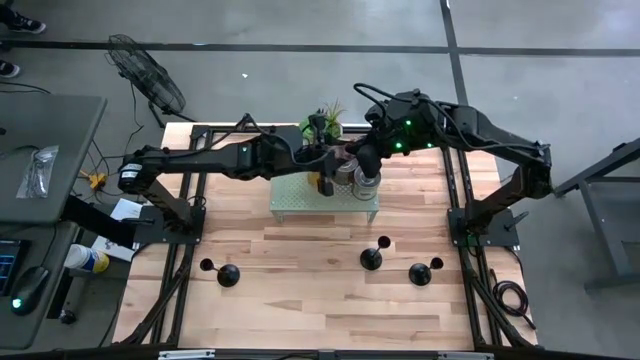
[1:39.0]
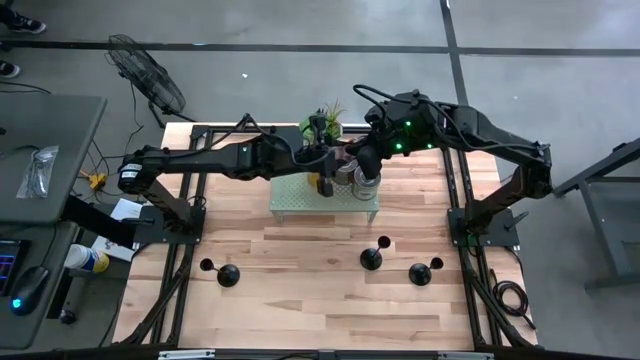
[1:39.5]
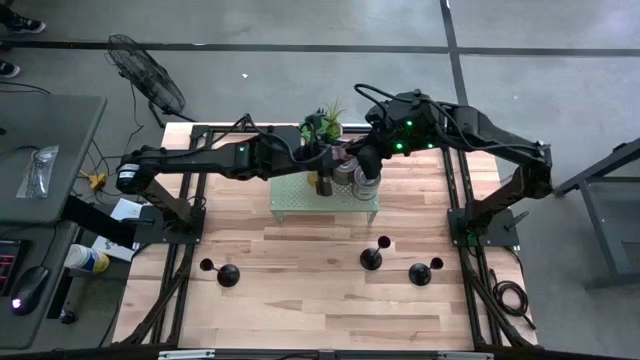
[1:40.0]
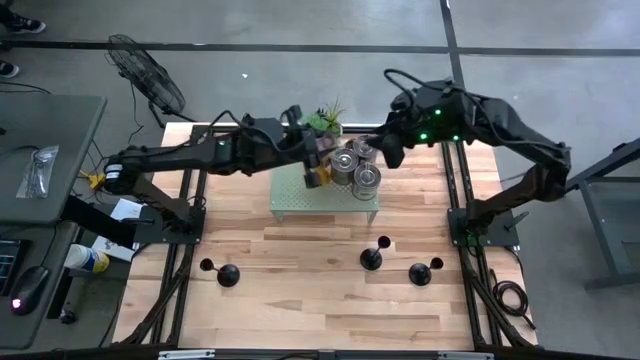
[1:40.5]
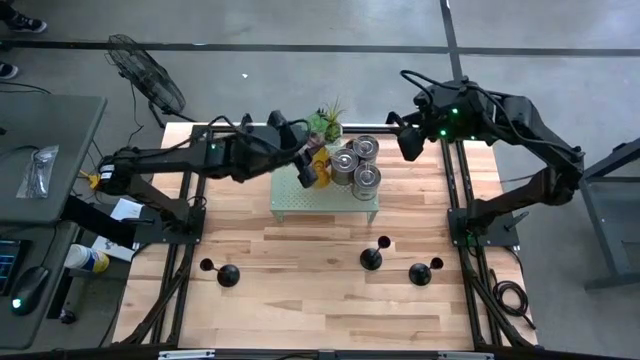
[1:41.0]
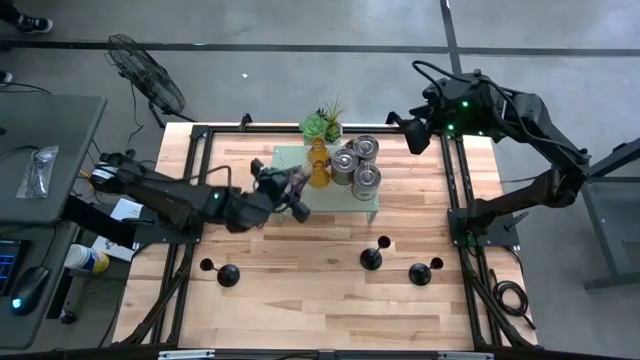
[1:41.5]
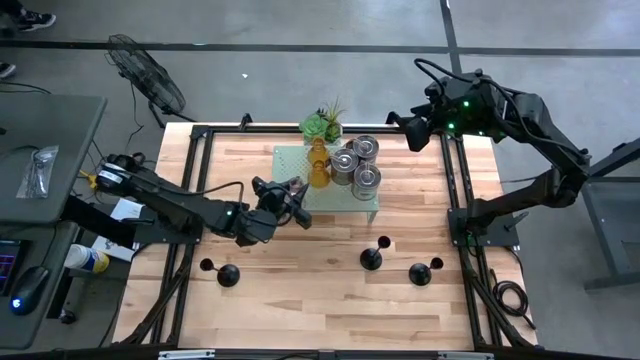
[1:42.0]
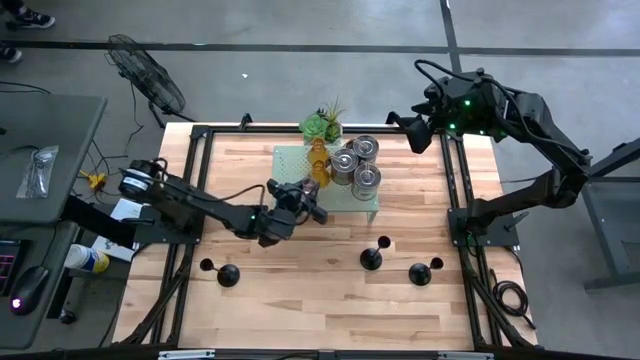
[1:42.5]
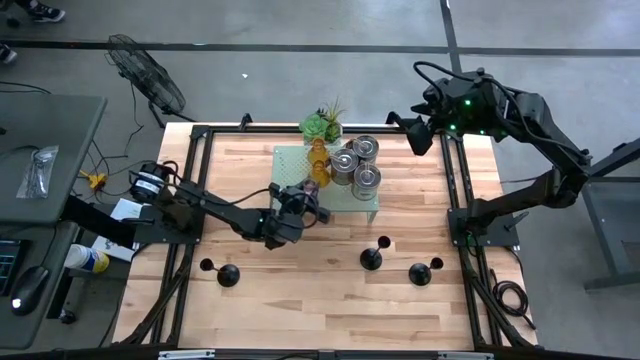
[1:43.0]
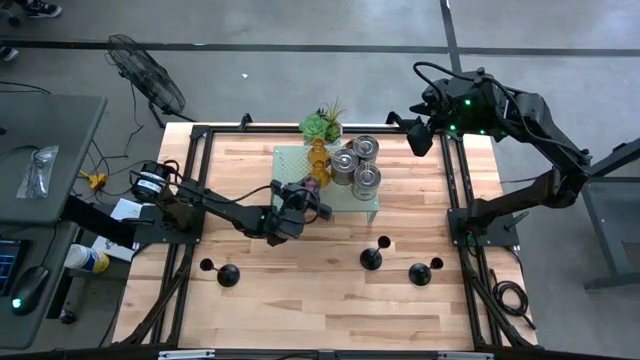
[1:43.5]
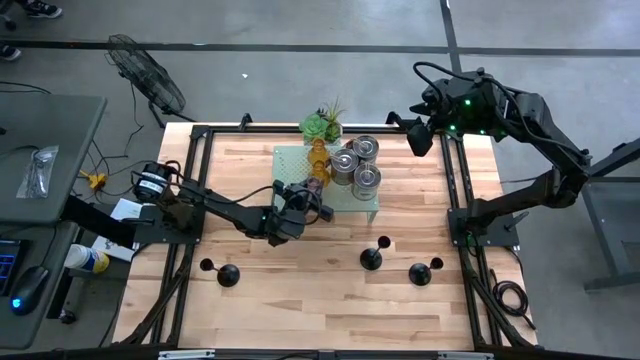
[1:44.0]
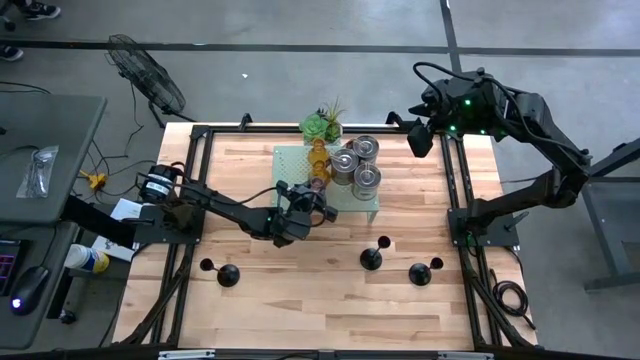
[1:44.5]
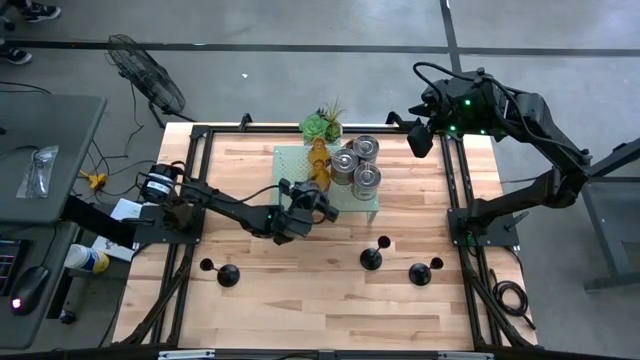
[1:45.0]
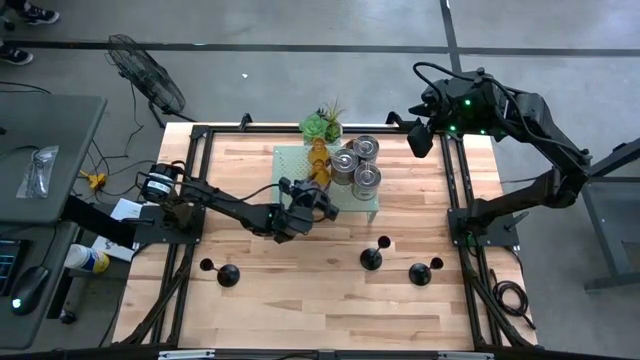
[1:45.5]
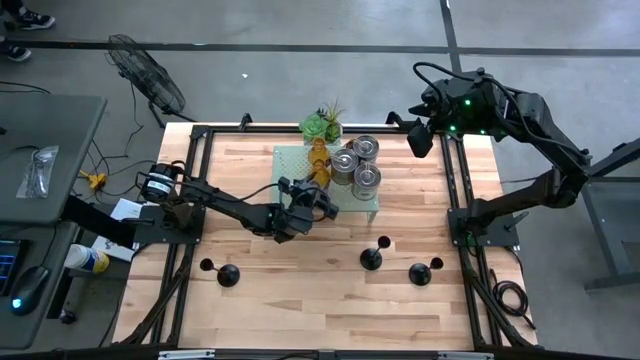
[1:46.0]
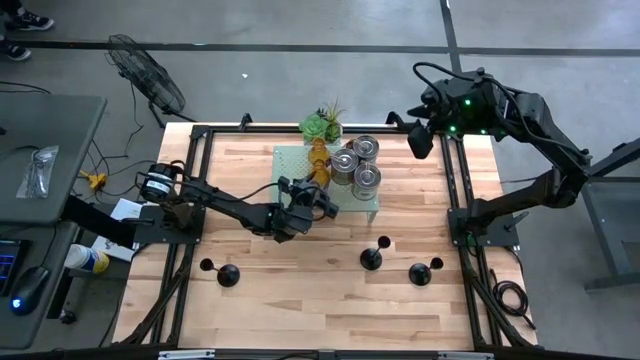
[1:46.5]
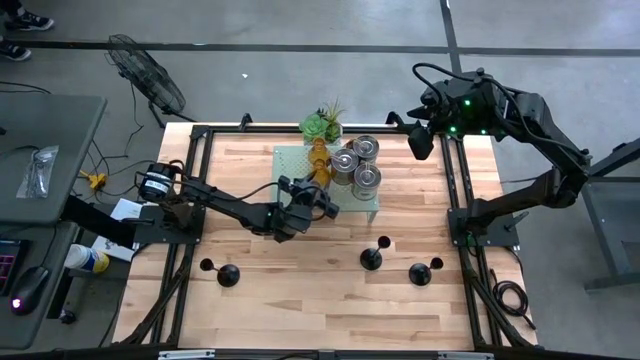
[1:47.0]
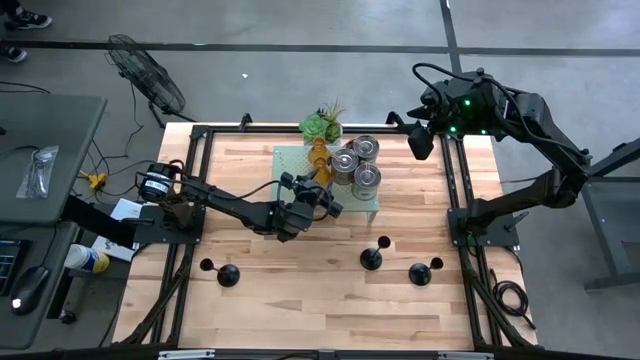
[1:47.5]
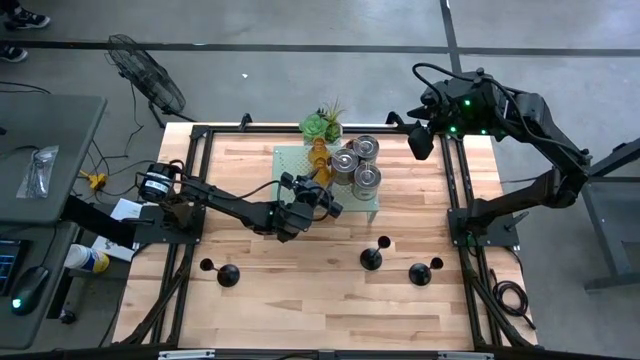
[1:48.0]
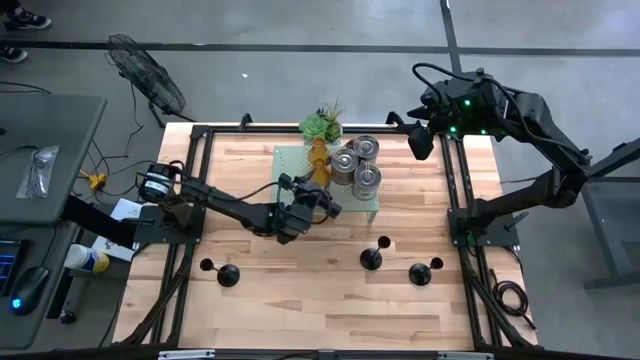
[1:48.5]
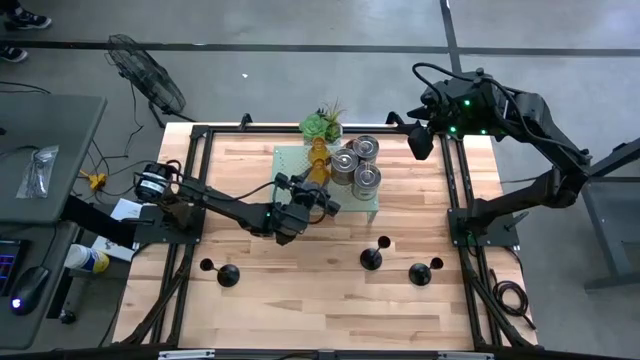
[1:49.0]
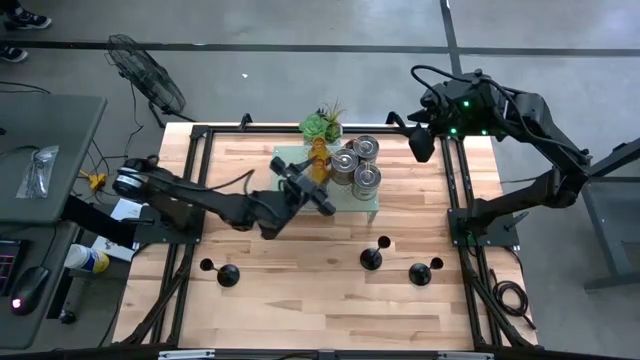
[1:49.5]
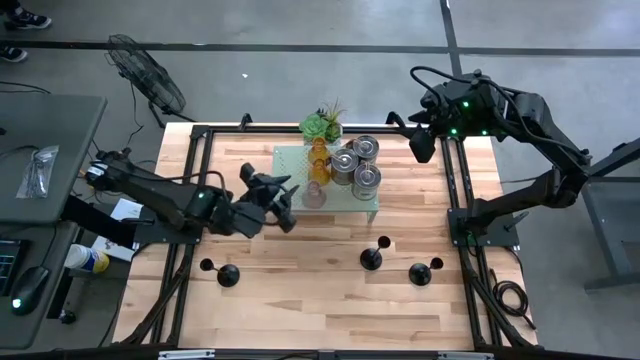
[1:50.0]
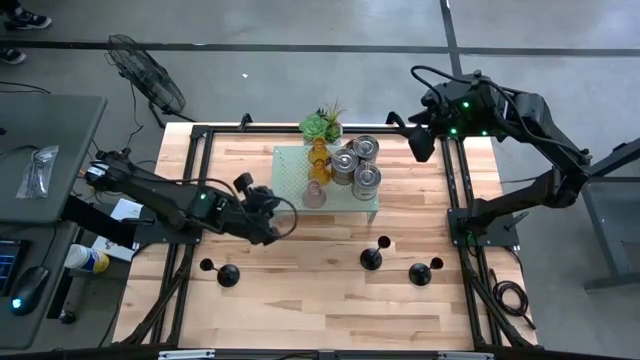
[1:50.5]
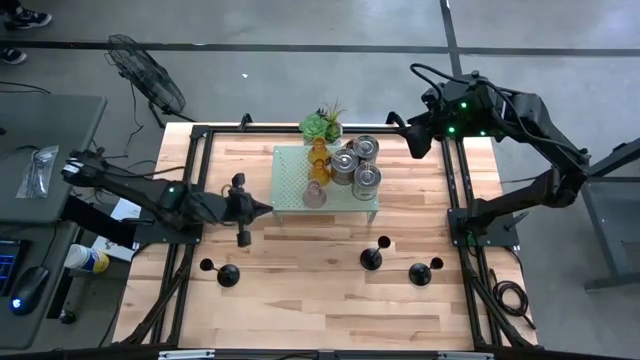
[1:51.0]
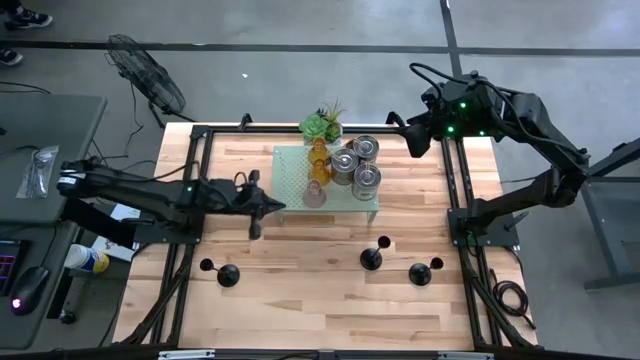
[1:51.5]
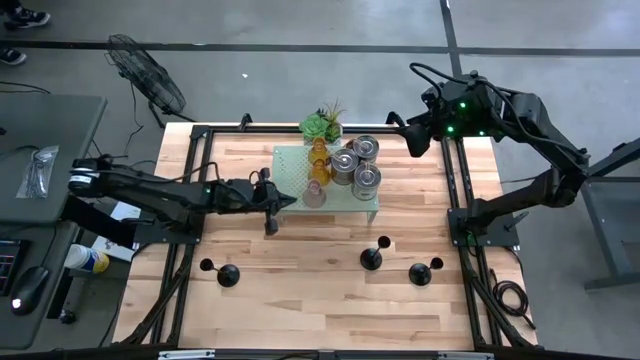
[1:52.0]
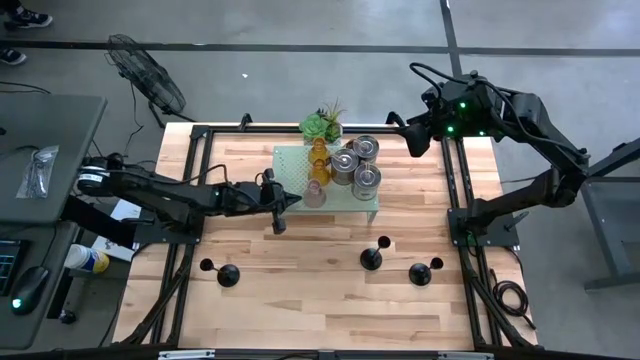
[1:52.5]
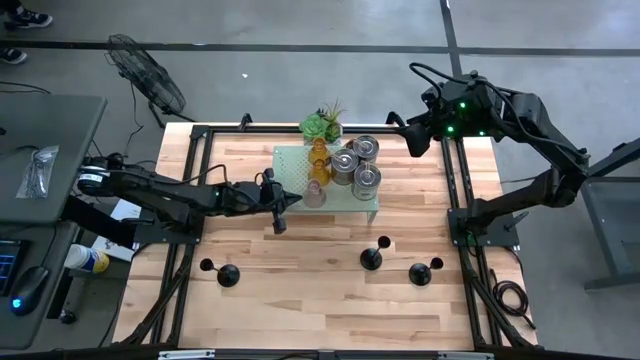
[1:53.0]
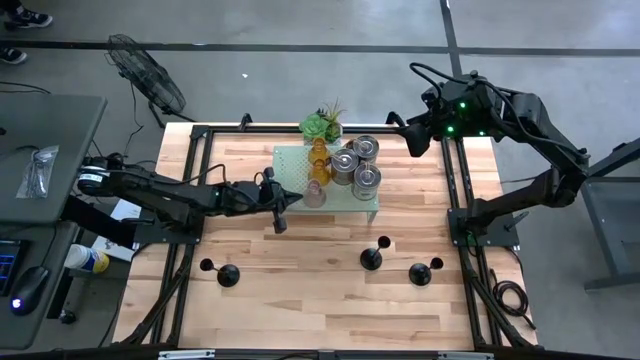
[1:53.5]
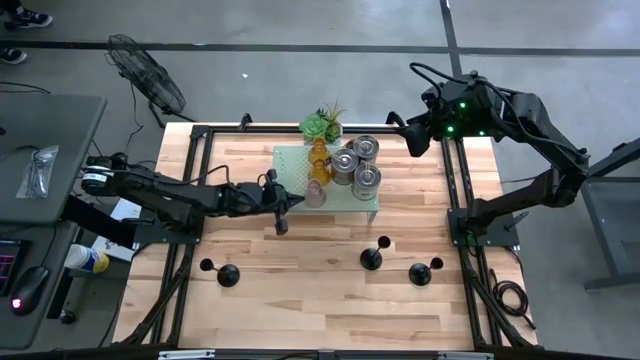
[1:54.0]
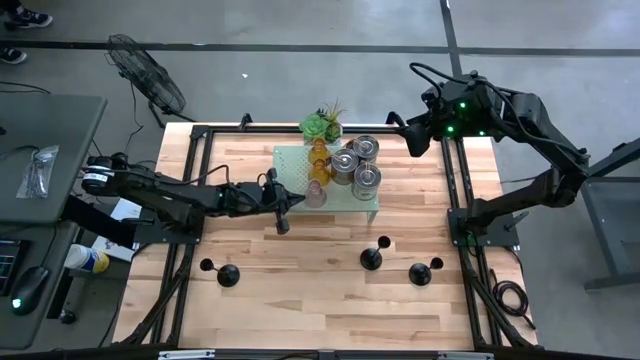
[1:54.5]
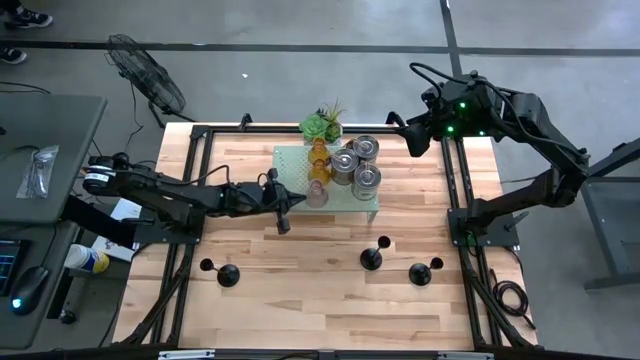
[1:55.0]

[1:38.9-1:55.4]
Task: Pick & Place candle stick holders
Put the pink glass candle holder on the shelf

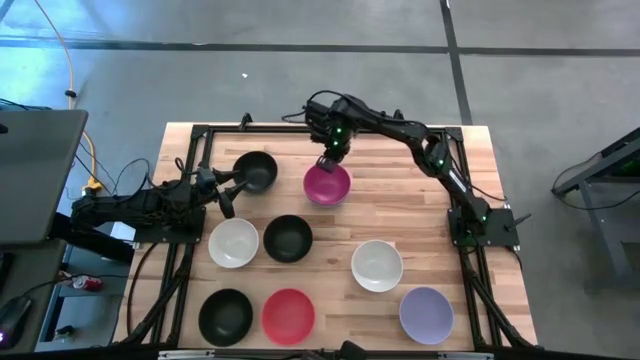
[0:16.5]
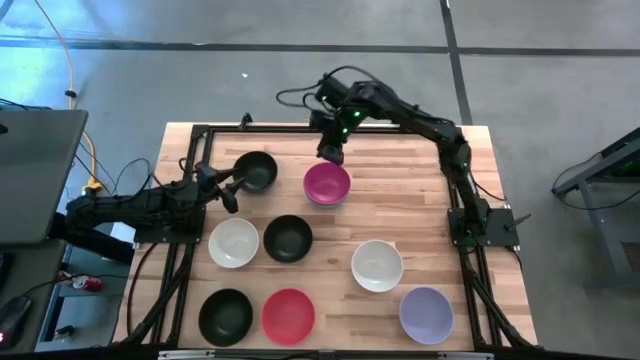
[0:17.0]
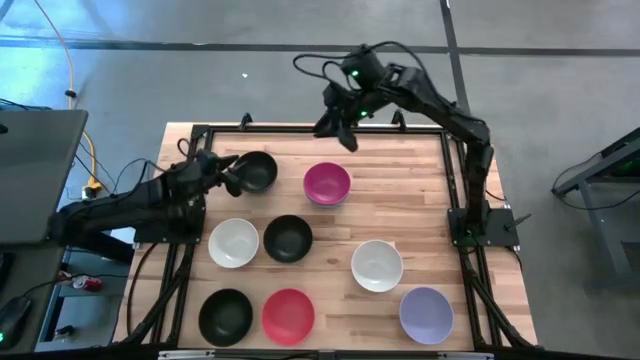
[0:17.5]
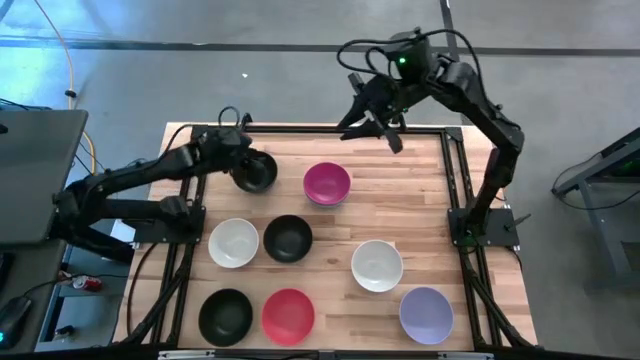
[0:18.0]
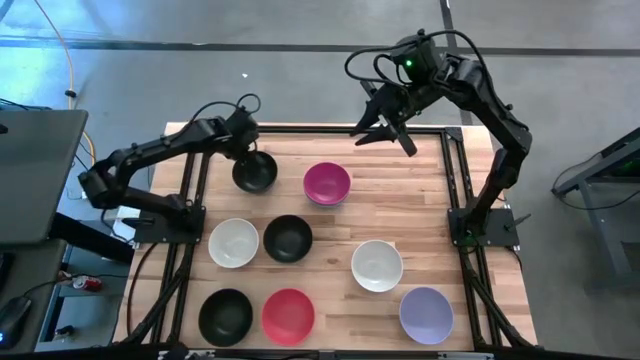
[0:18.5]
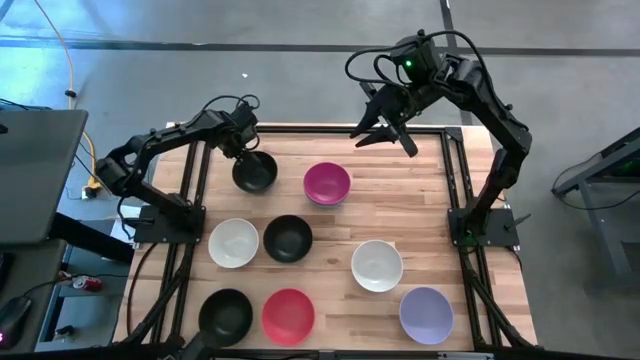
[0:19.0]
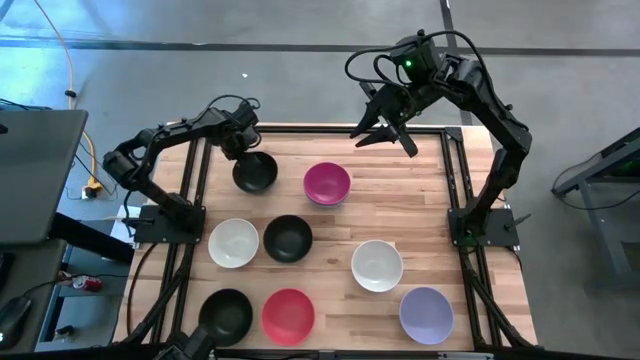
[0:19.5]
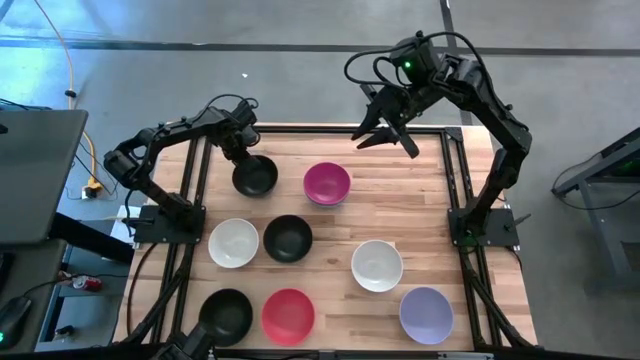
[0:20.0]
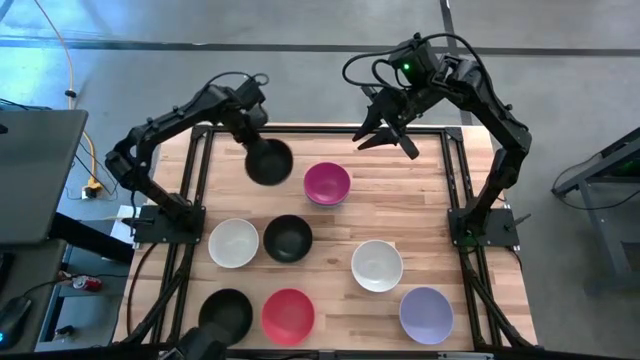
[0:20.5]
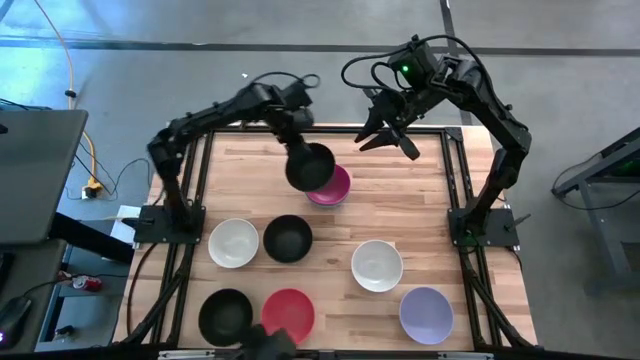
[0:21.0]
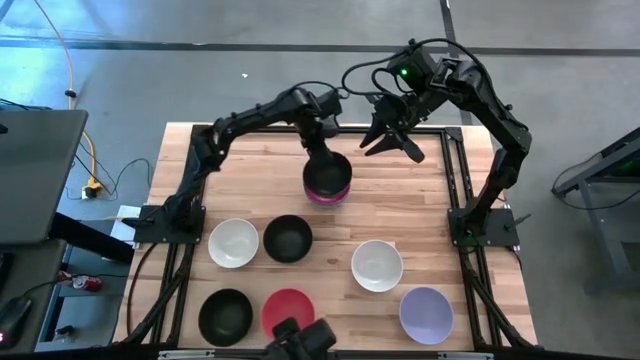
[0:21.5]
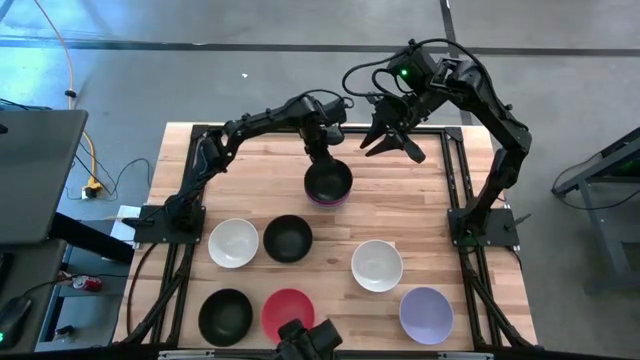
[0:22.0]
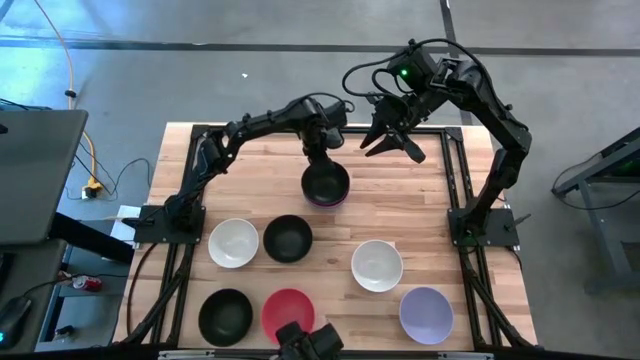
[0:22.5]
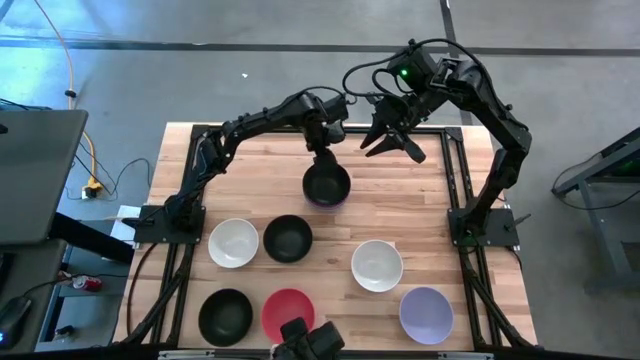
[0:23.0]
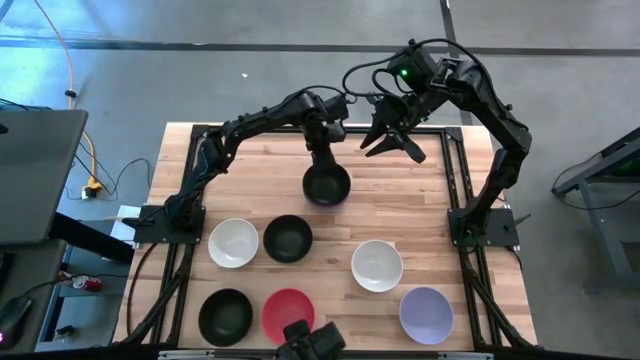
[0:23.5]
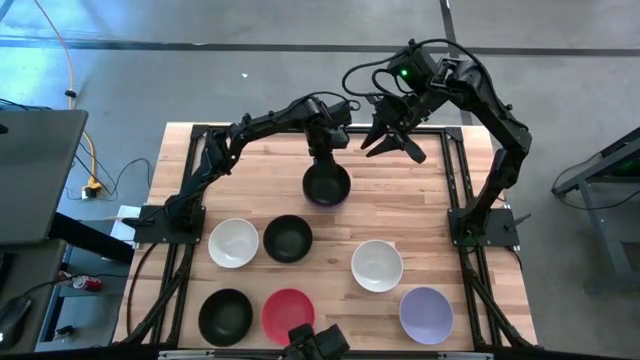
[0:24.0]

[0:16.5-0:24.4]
Task: Nest bowls inside each other
Stack the top black bowl on top of the pink bowl
